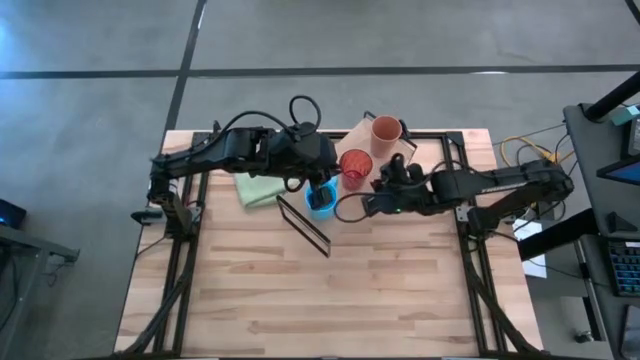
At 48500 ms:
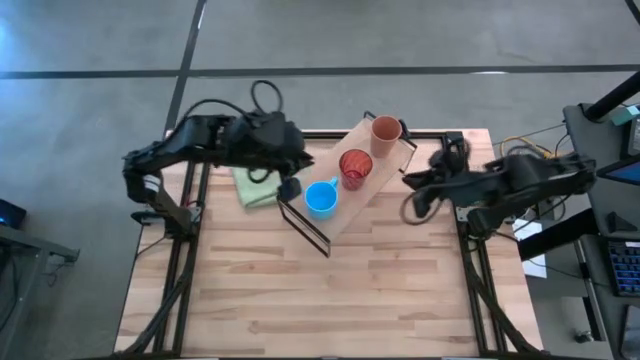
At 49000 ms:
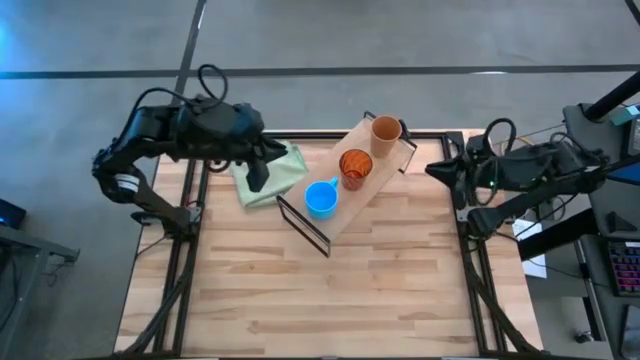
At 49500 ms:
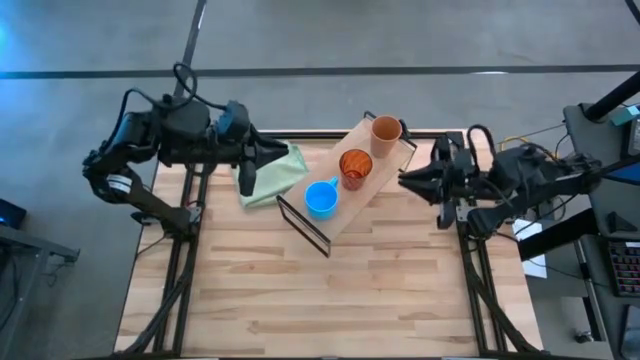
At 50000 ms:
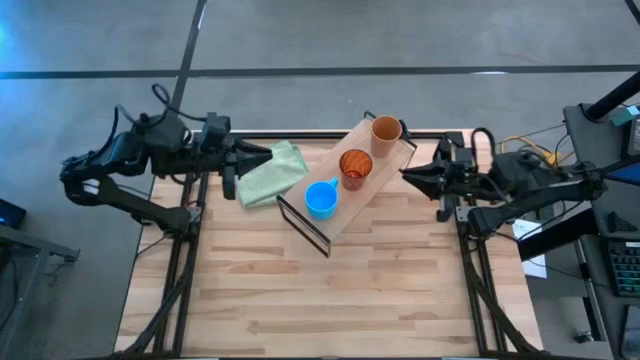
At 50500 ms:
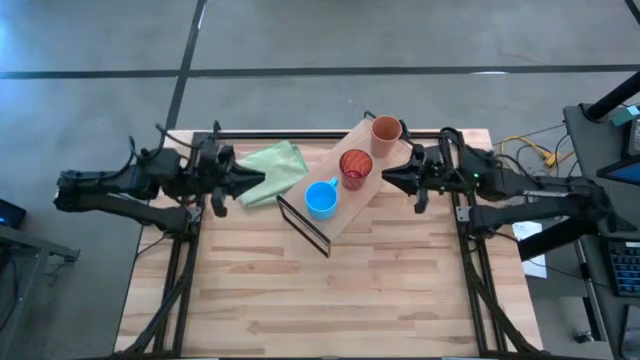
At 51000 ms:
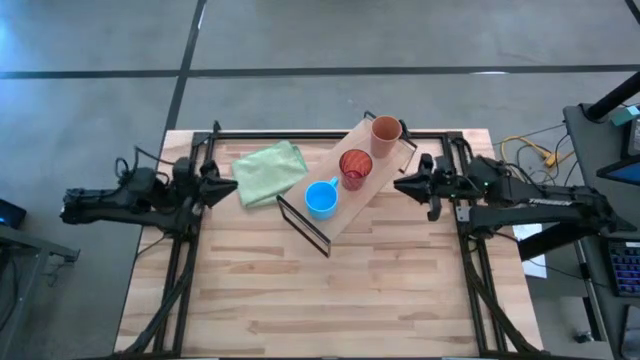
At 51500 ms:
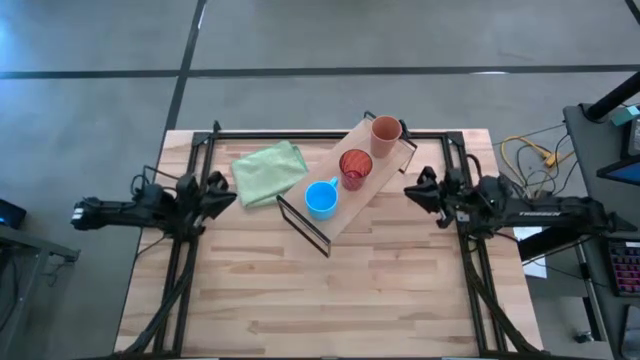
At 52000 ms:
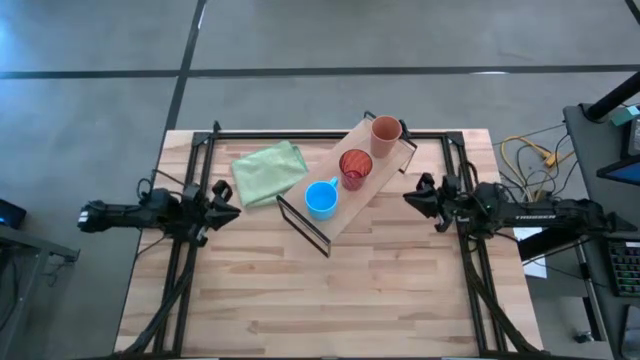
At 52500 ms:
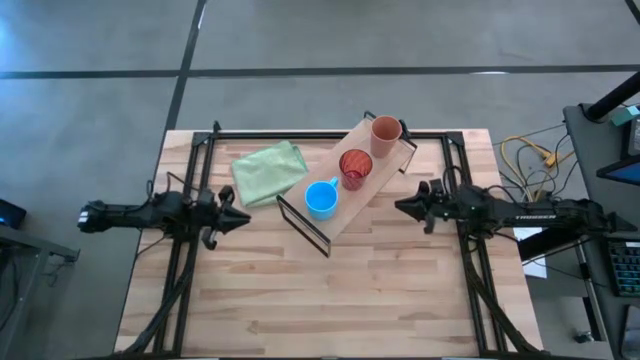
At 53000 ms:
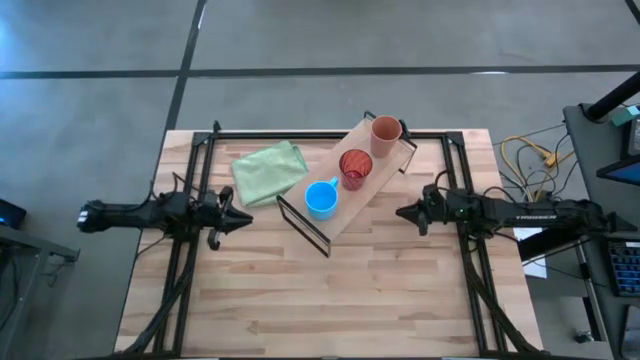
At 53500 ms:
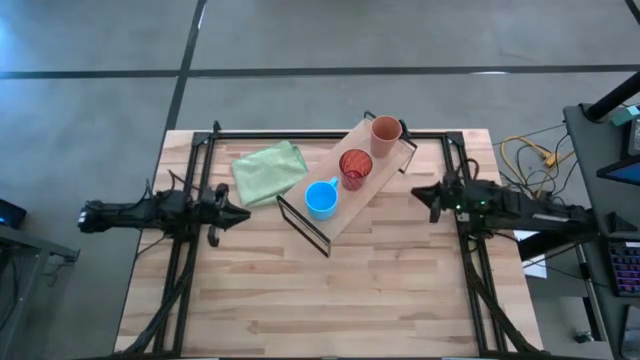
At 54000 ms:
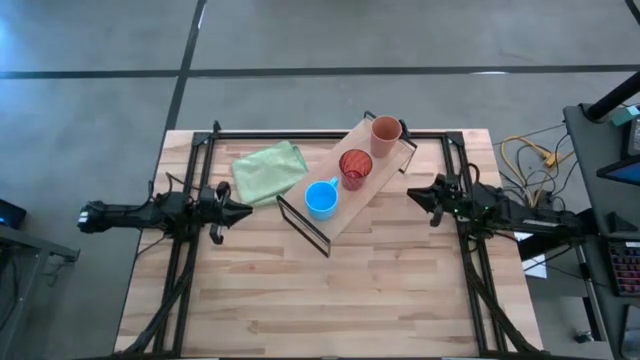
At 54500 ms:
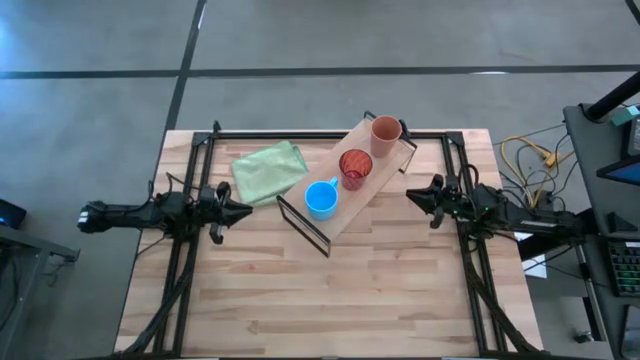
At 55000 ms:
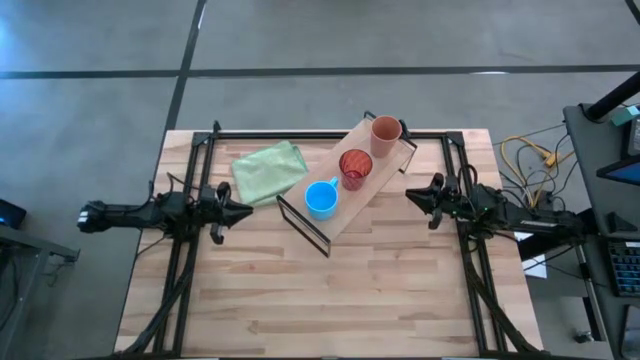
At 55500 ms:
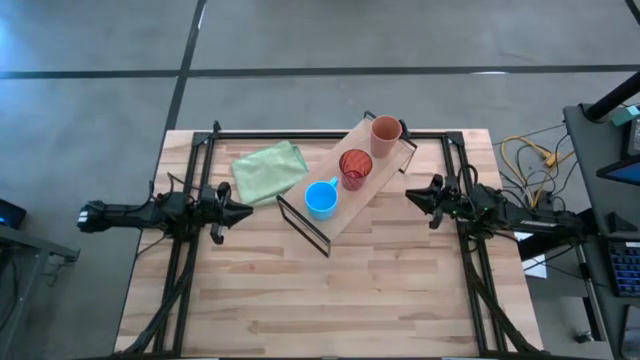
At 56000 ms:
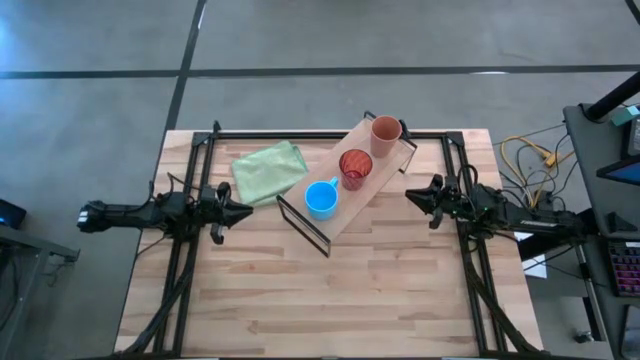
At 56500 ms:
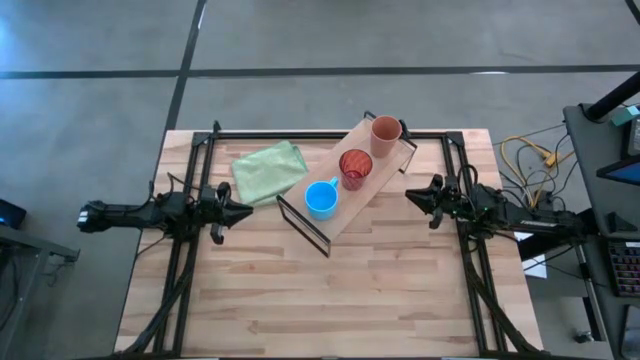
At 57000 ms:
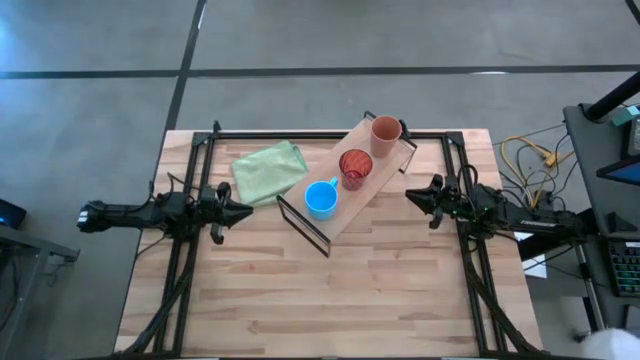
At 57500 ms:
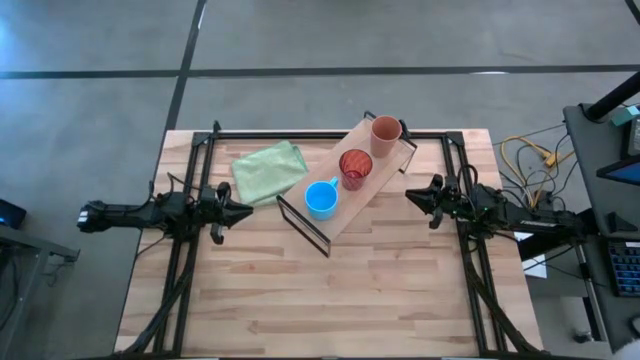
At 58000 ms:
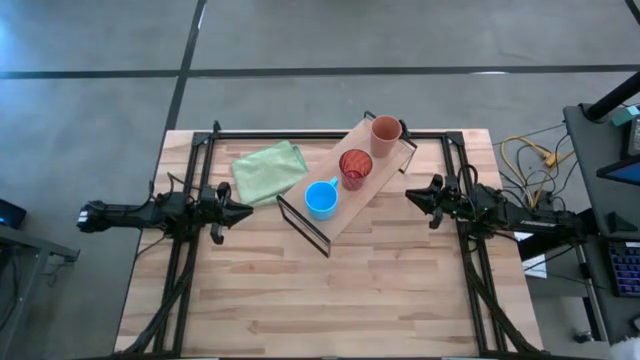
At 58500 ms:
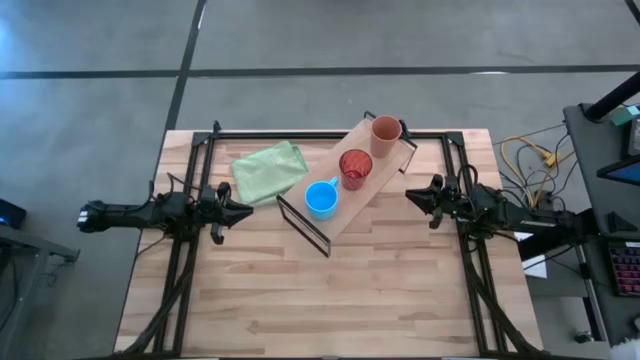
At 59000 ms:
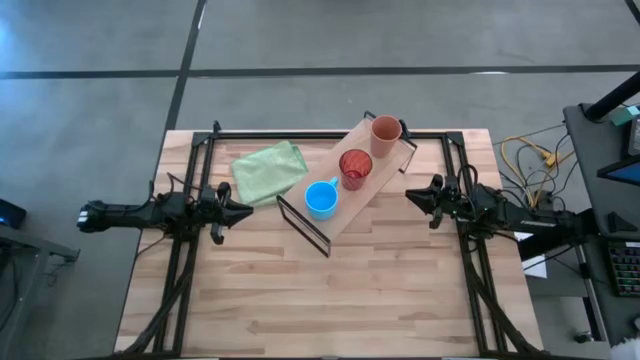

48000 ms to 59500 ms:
Task: Stack small to large cups/mugs on shelf
Return to Home Position

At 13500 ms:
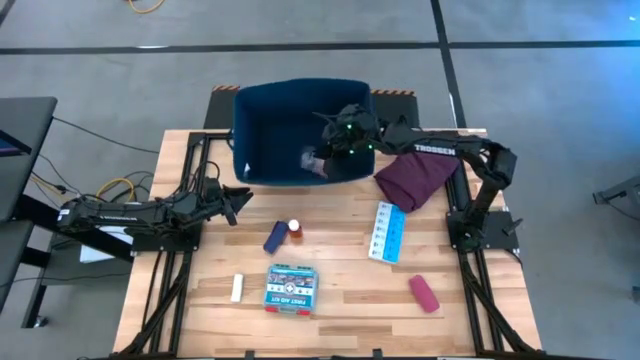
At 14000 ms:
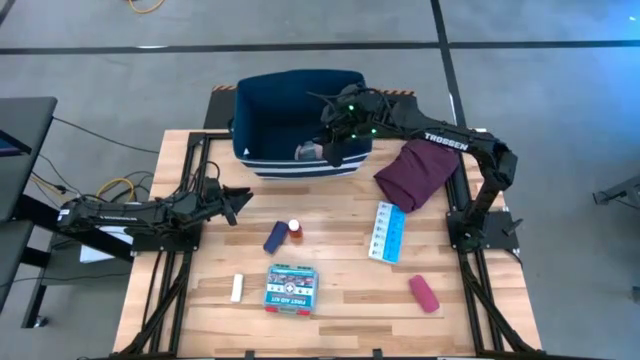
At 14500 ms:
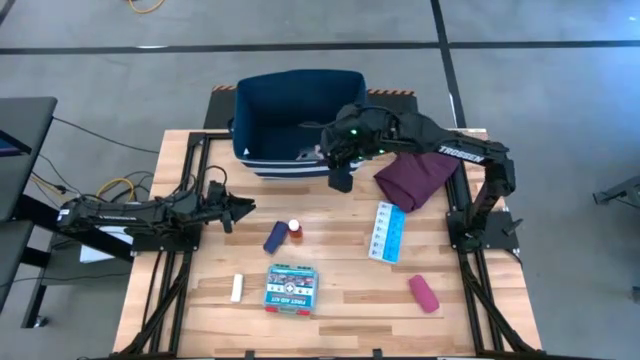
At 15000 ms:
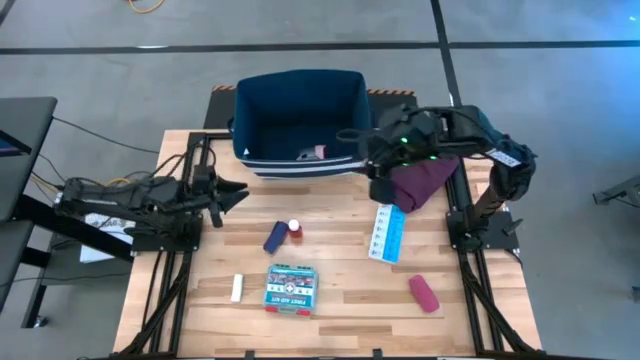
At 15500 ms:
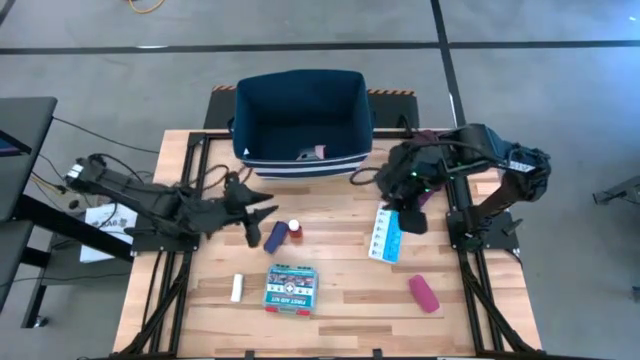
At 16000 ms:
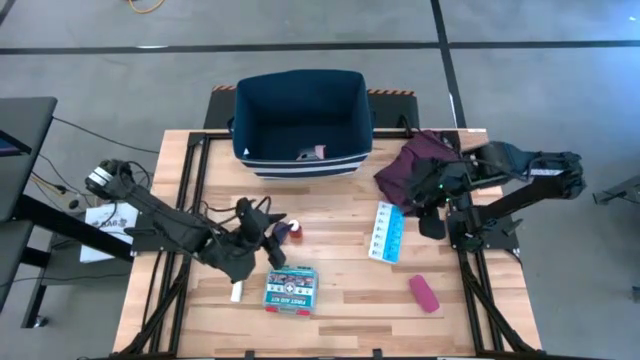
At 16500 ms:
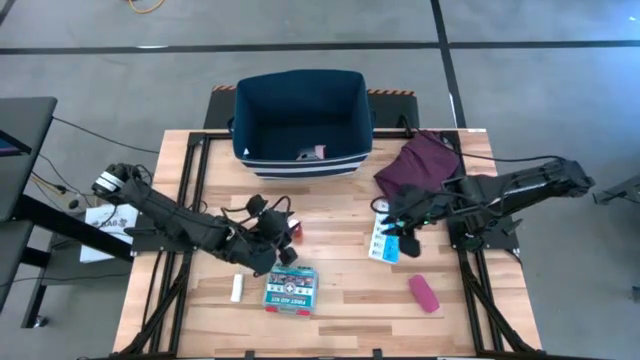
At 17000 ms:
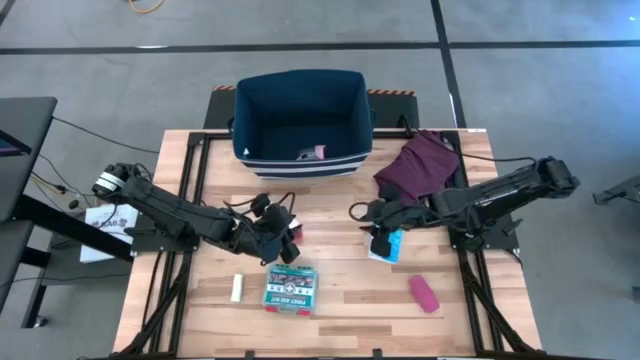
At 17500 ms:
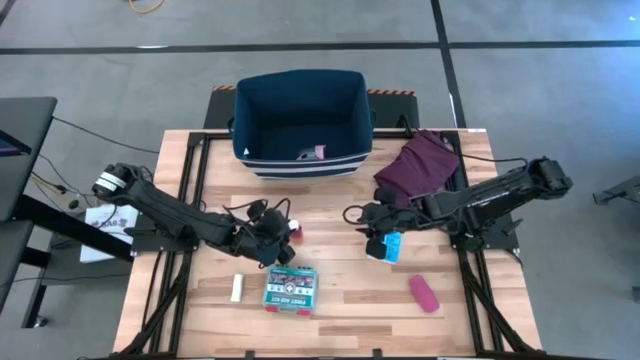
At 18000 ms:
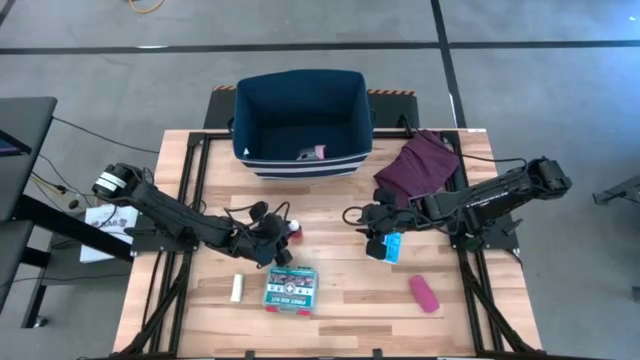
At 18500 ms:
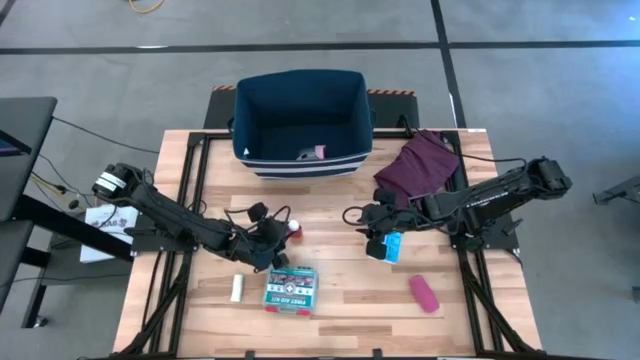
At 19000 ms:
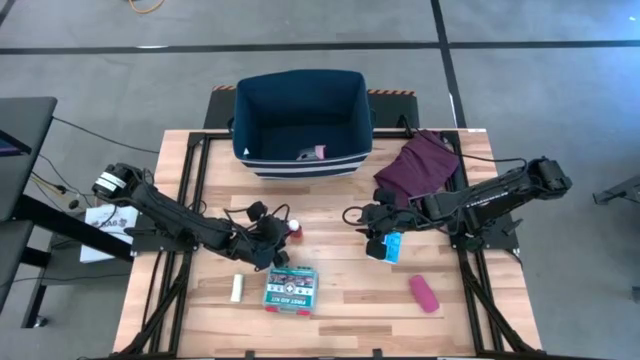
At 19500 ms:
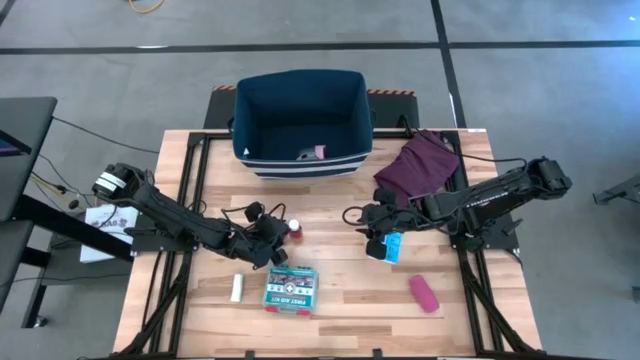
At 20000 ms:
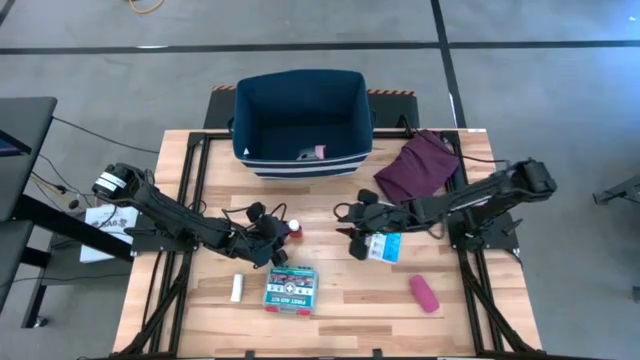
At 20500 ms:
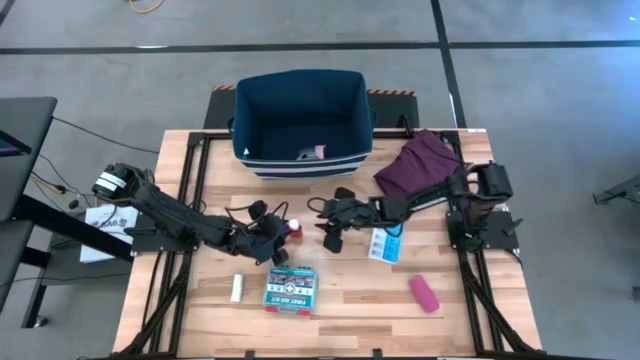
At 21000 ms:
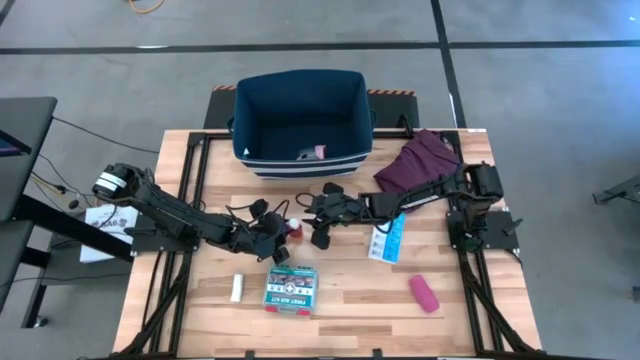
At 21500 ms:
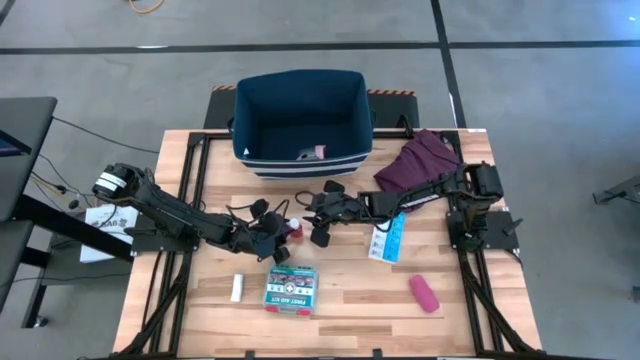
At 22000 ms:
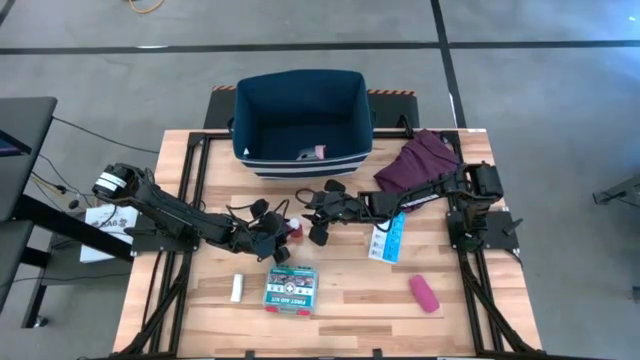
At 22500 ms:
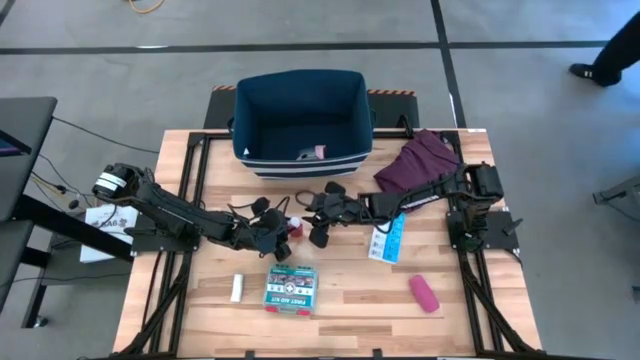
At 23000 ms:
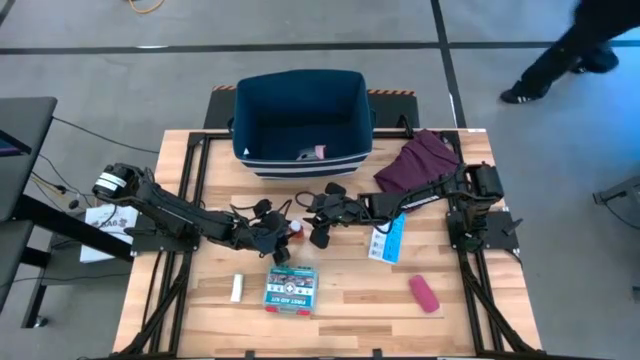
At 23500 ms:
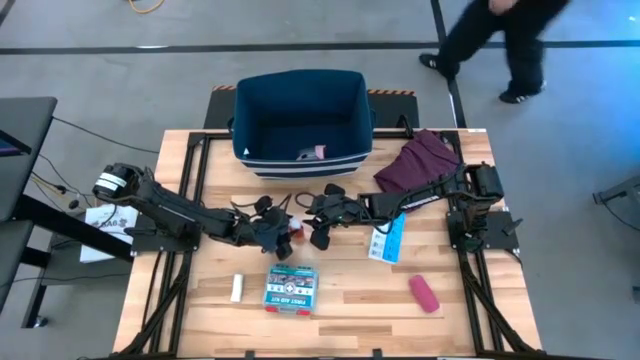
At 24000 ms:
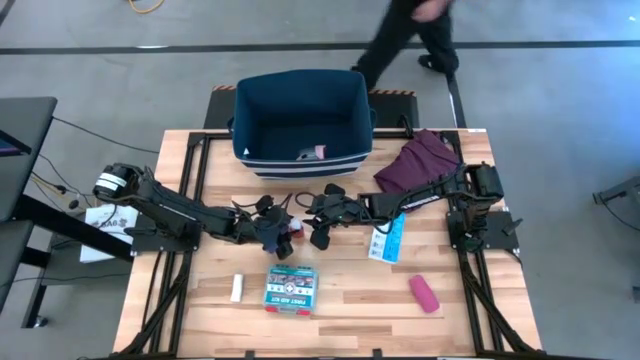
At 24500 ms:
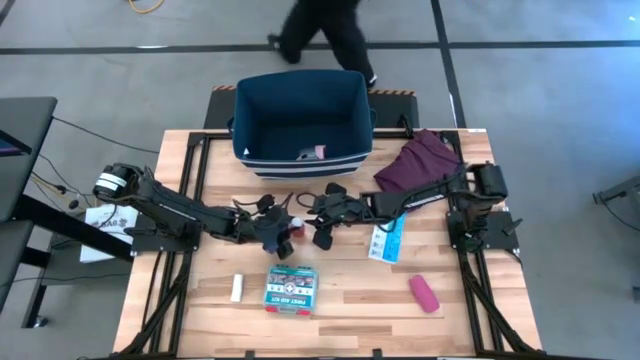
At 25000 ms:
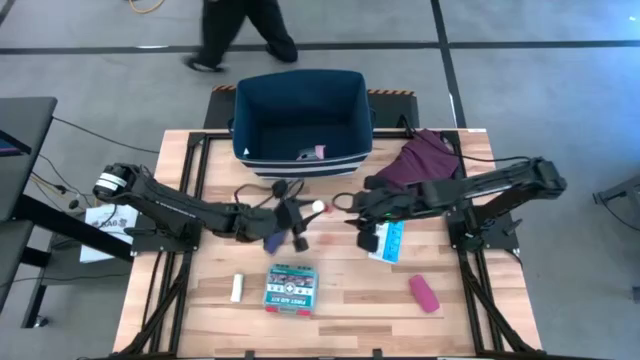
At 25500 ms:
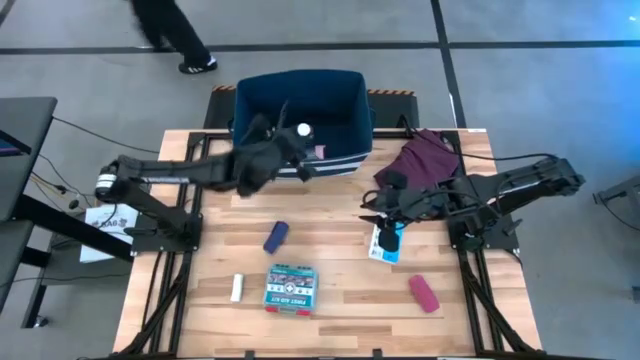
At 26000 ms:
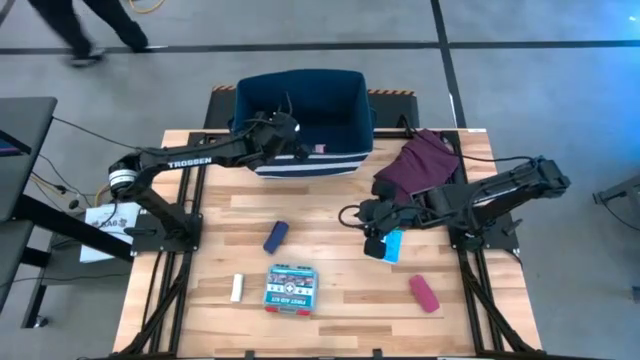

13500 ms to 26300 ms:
Task: Pick & place medical supplies in basket/bin
Put the orange bottle into the blue bin
